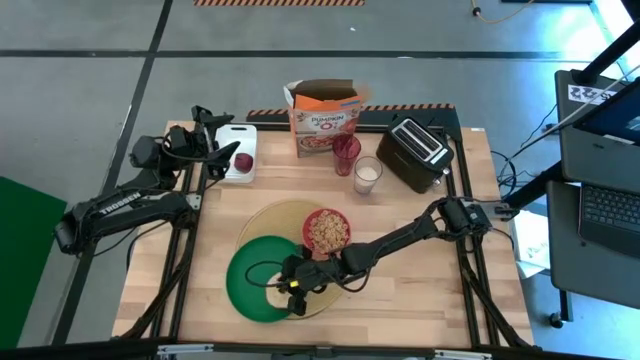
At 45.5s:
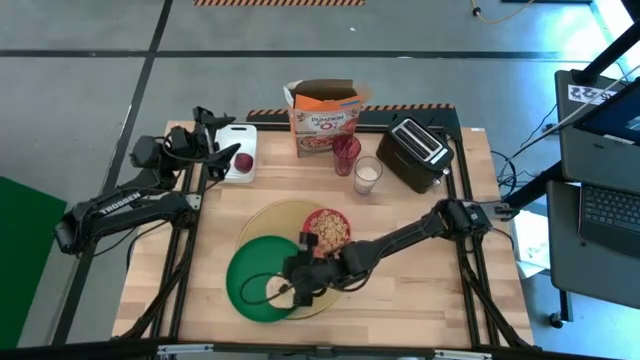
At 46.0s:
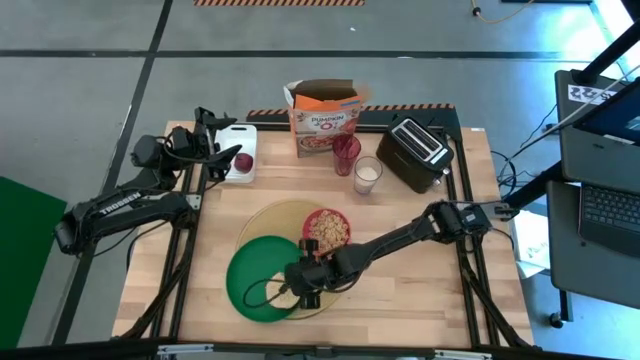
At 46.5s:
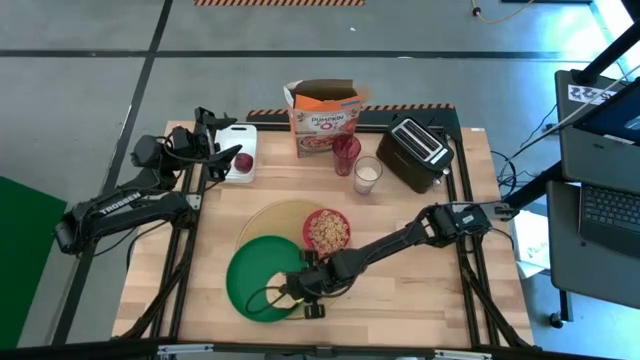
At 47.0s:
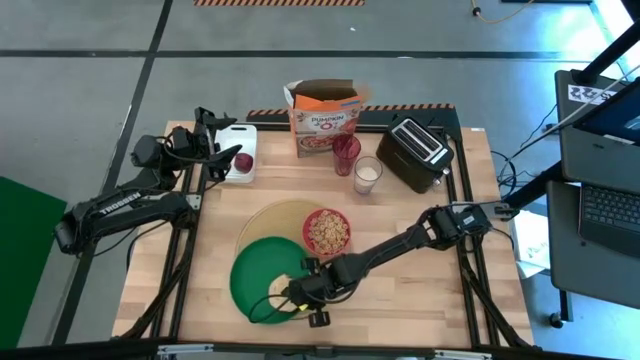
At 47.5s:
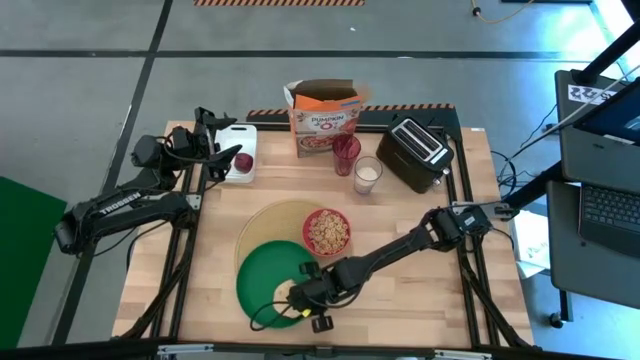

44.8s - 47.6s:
Task: Arrange a breakfast setting
Adjust the green plate

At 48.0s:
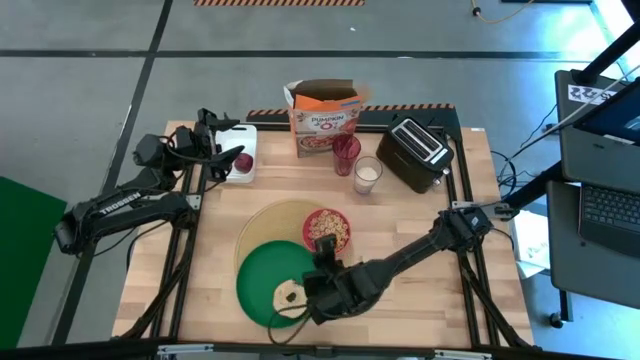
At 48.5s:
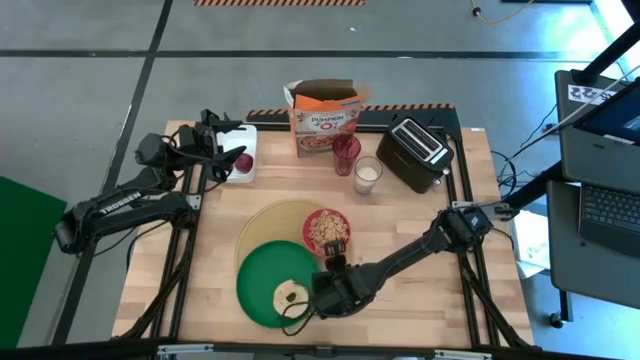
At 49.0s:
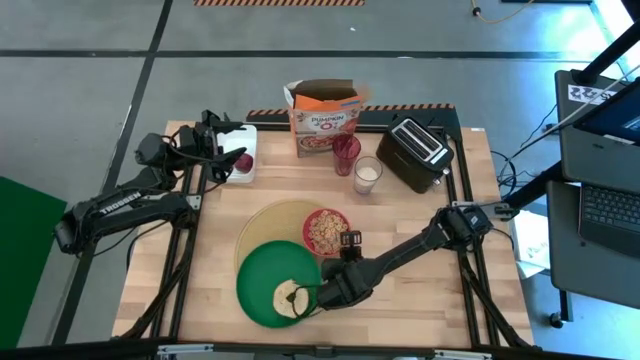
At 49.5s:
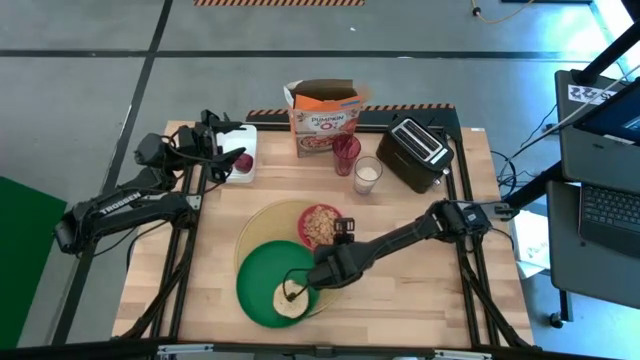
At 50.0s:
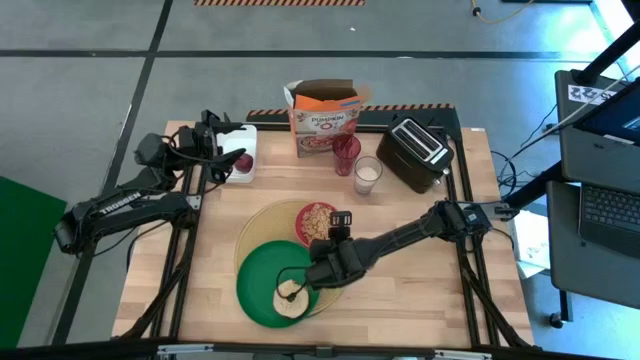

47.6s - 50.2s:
Adjust the orange bowl

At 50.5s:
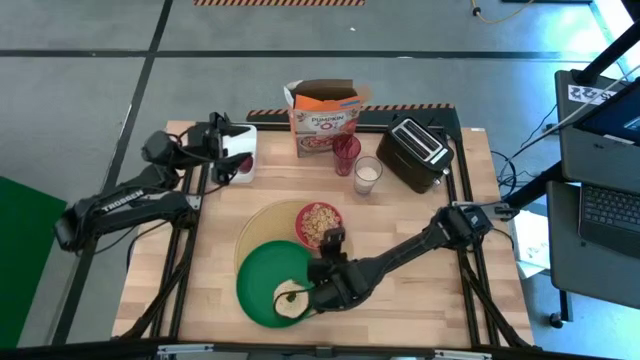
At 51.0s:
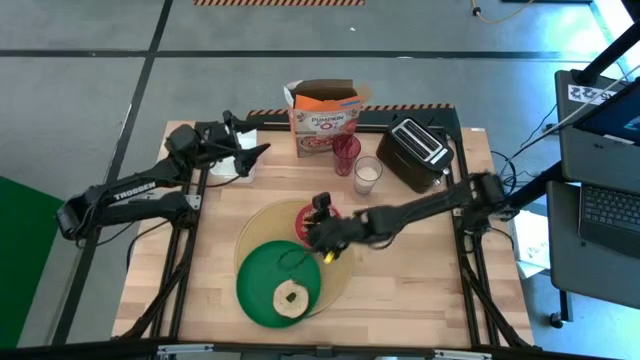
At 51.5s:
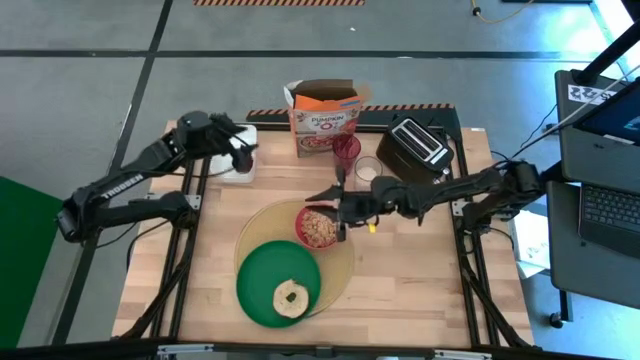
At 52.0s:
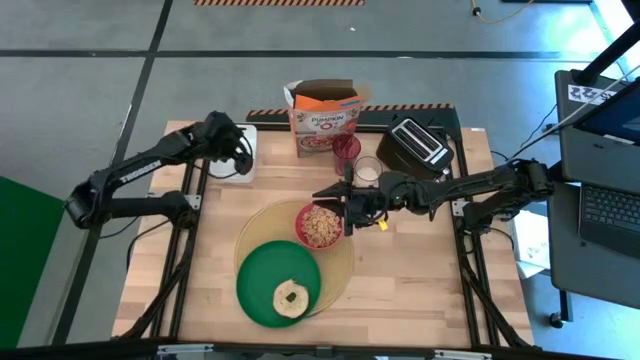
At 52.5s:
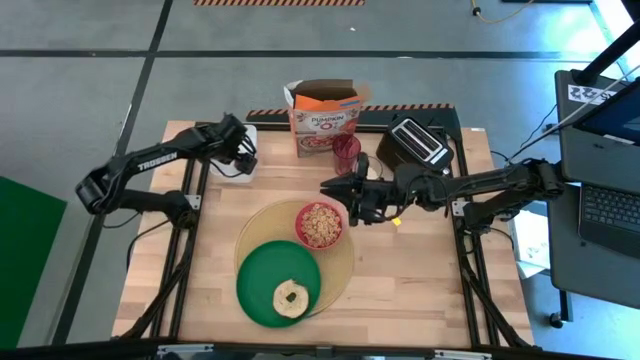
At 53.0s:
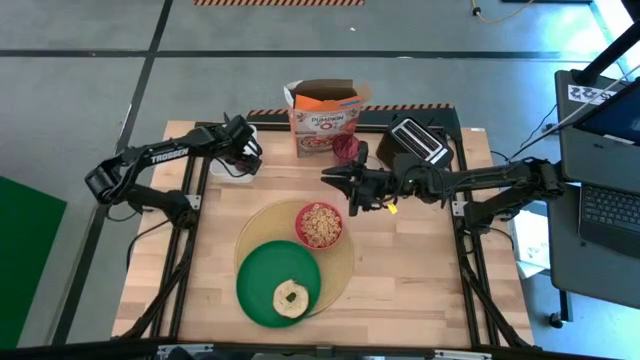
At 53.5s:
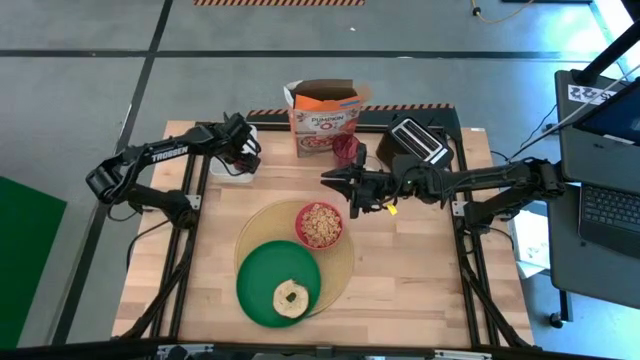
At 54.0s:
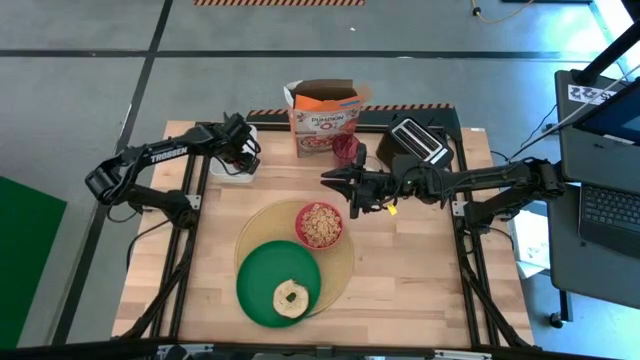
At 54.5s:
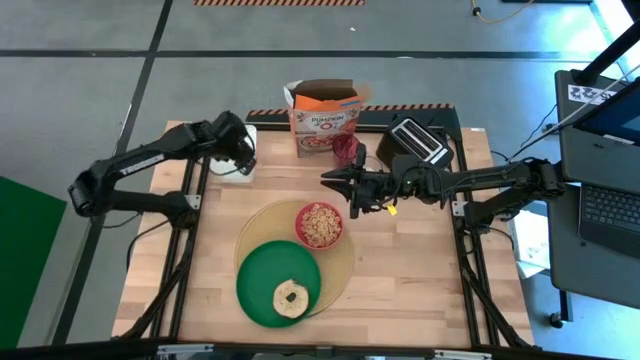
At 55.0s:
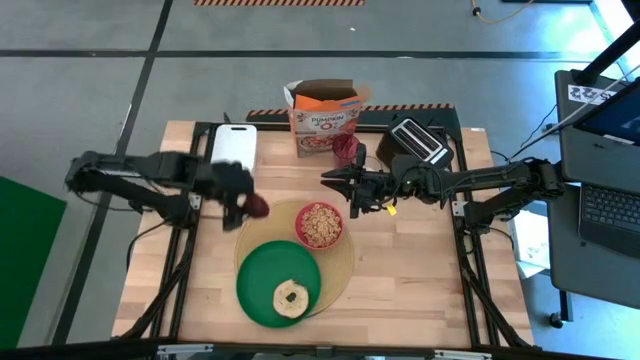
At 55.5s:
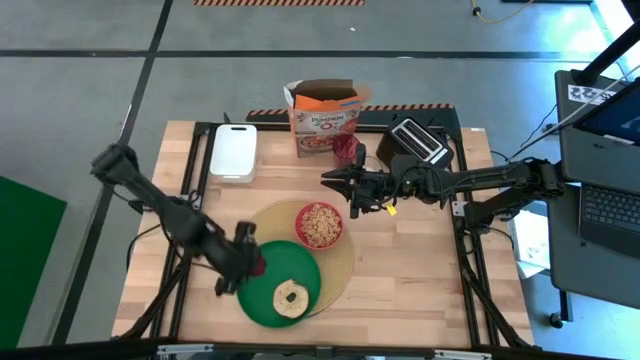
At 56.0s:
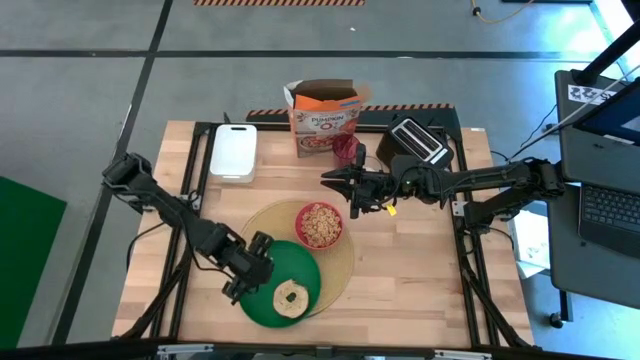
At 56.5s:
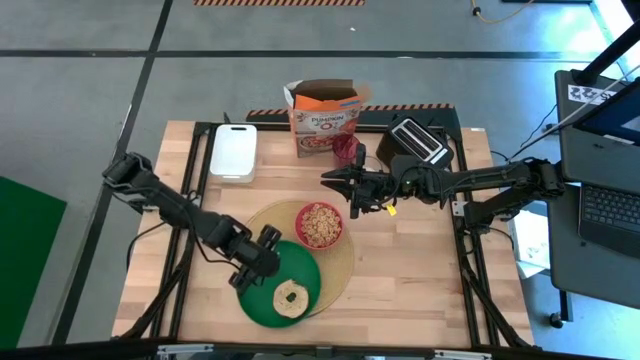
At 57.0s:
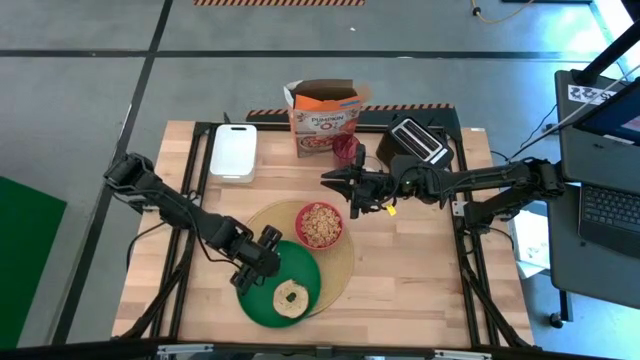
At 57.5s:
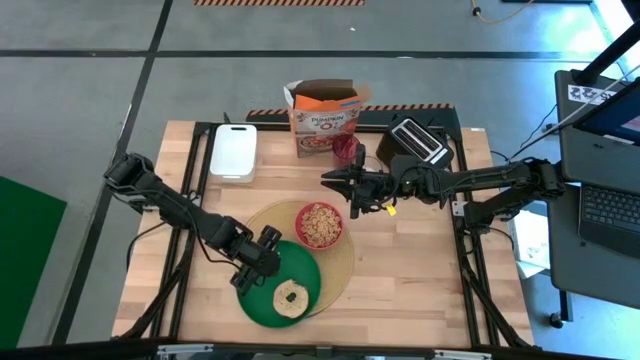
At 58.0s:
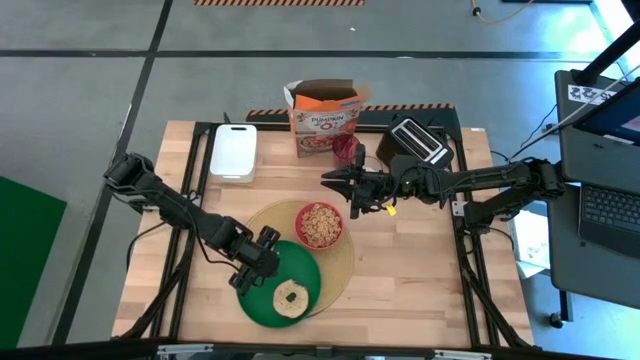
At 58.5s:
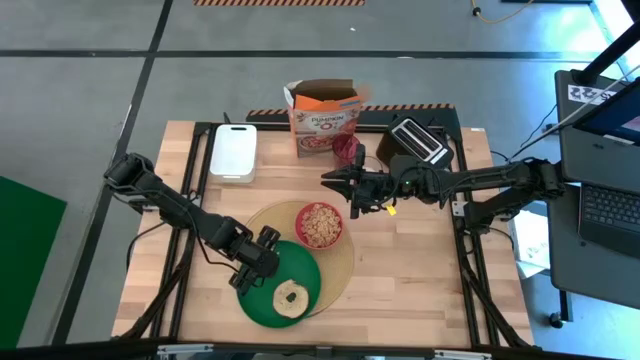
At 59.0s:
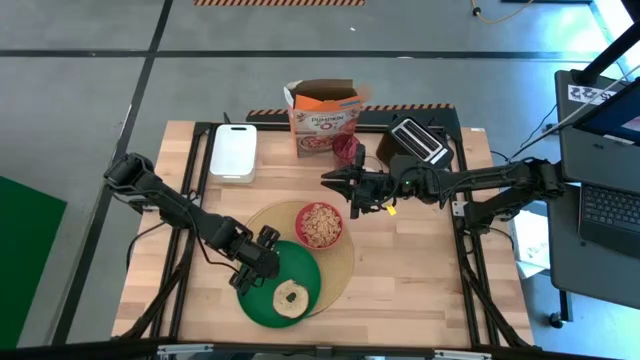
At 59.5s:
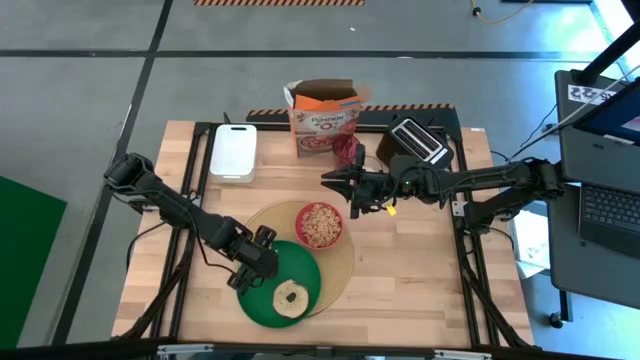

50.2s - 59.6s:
Put the apple on top of the green plate

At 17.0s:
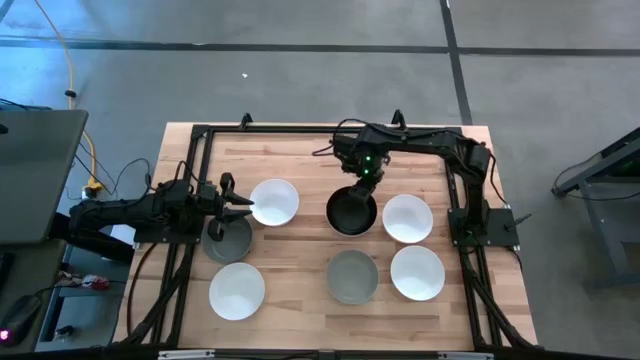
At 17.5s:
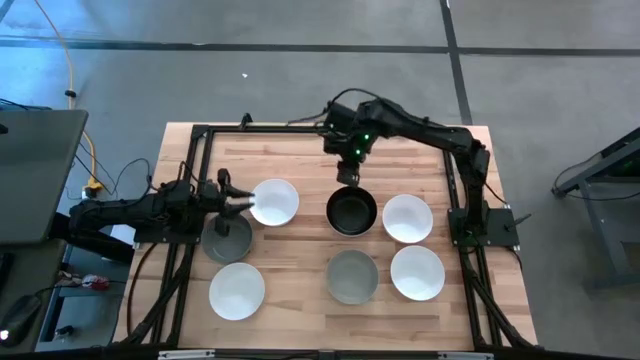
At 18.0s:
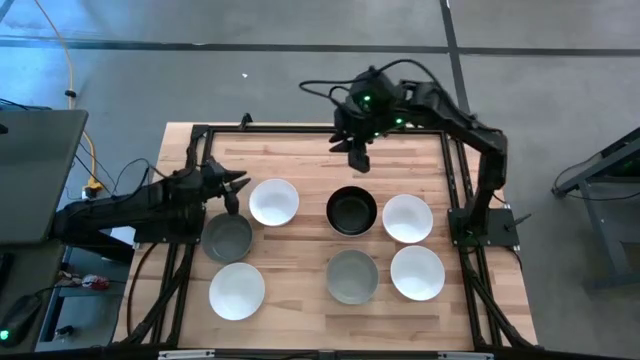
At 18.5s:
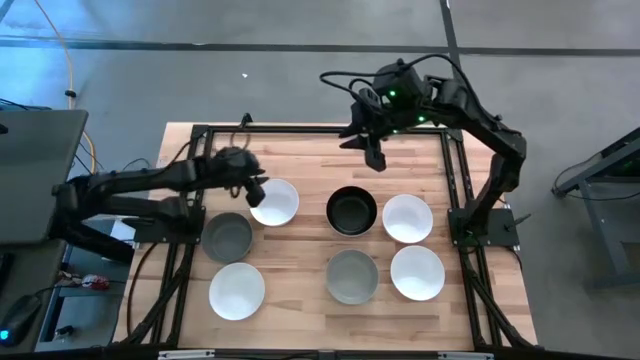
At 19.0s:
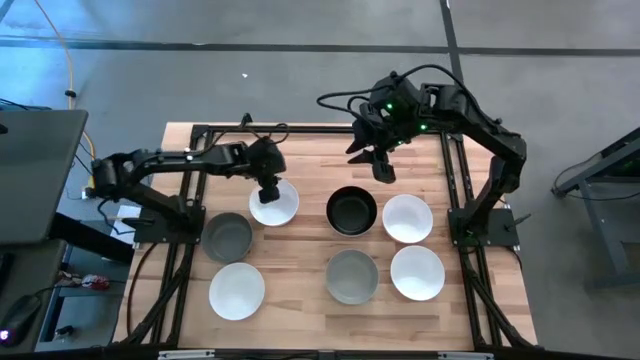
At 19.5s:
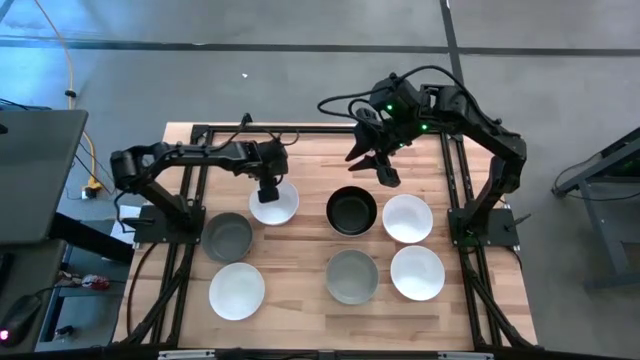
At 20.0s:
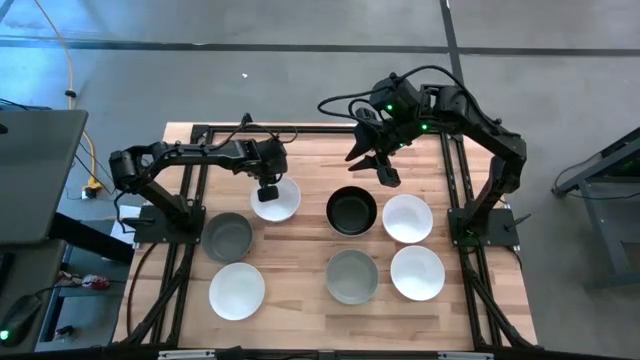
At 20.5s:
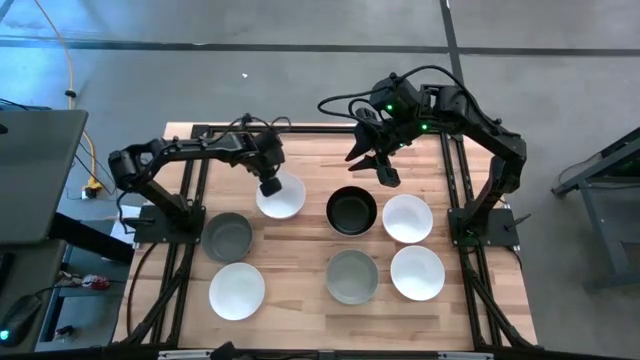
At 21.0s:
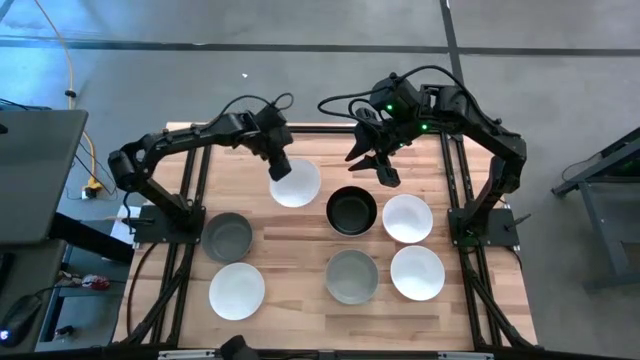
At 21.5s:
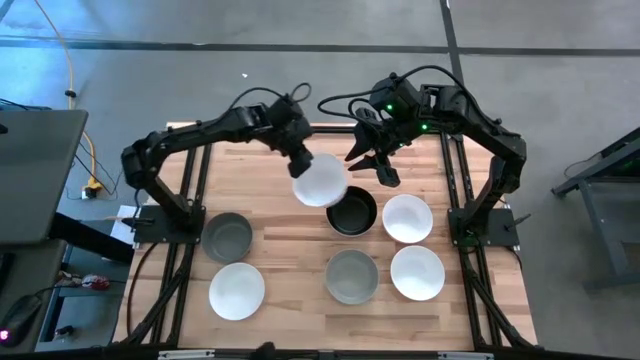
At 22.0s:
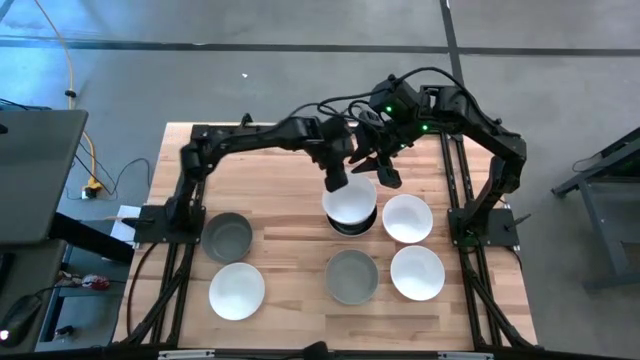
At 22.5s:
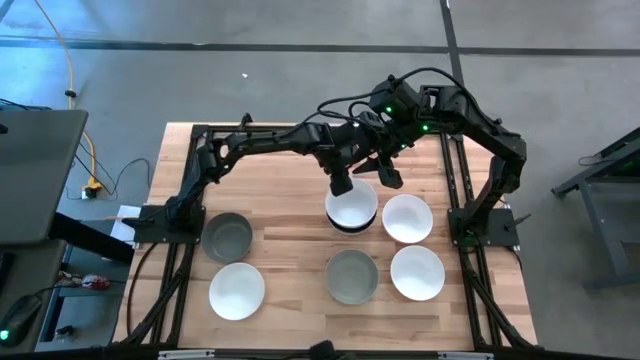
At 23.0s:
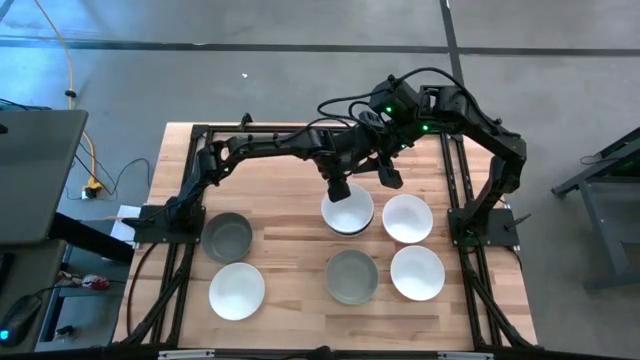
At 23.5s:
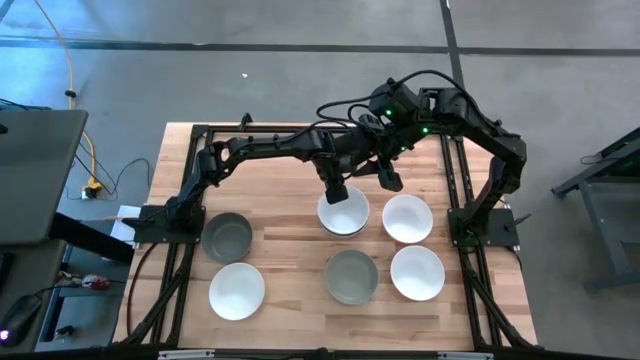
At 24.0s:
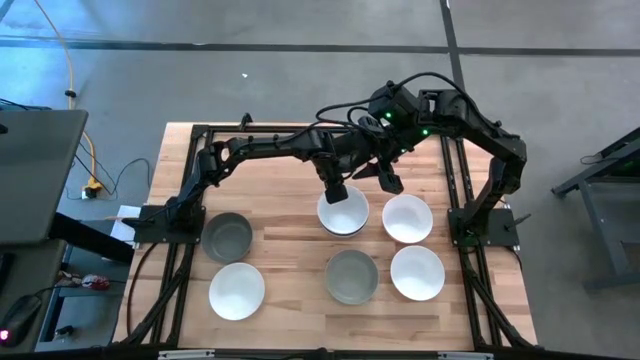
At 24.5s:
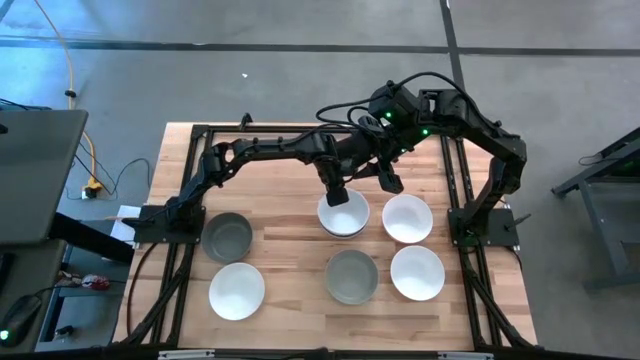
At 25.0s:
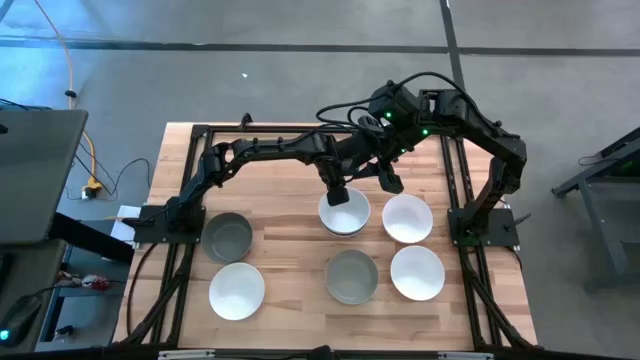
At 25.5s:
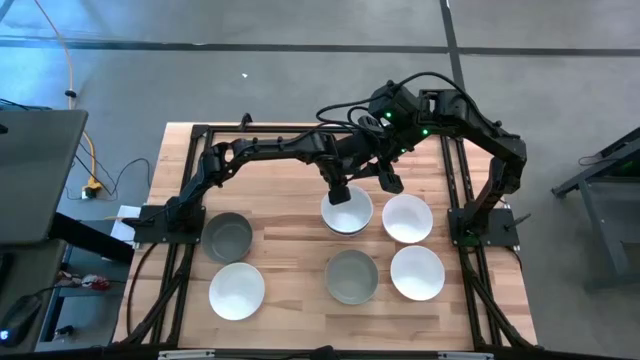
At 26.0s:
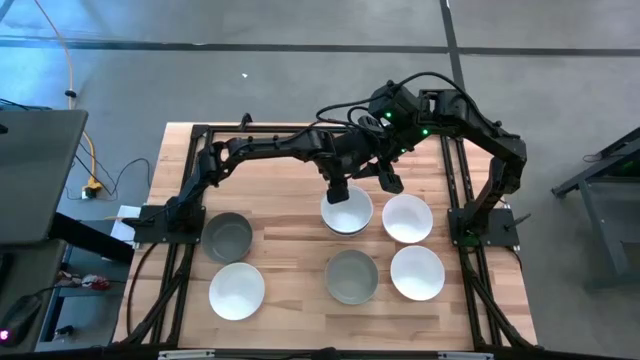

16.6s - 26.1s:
Task: Nest bowls inside each other
Stack the top right white bowl on top of the black bowl
